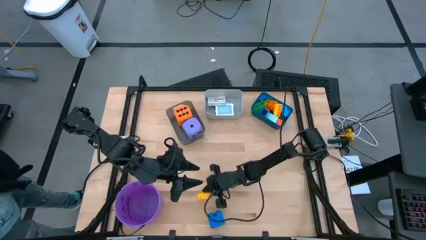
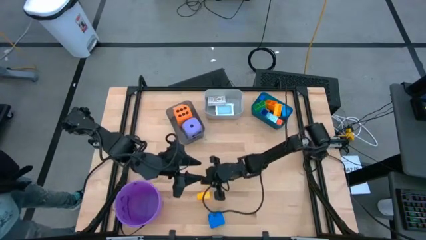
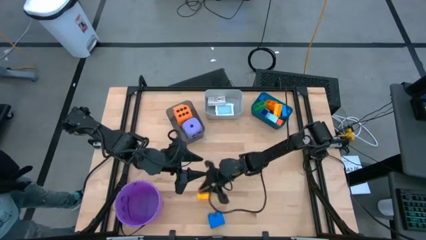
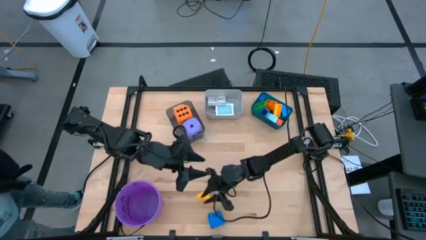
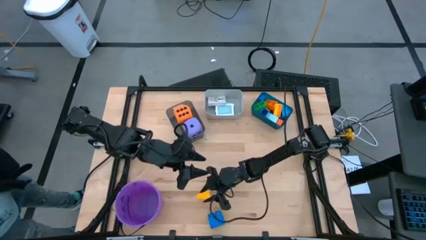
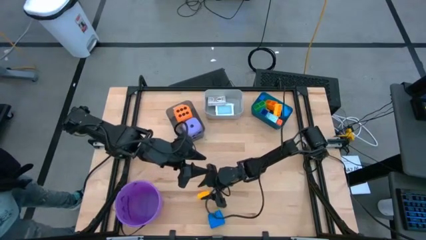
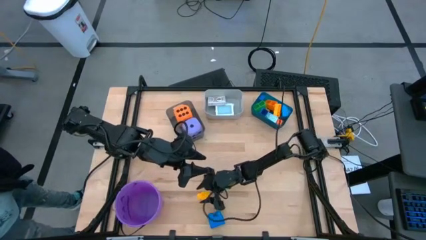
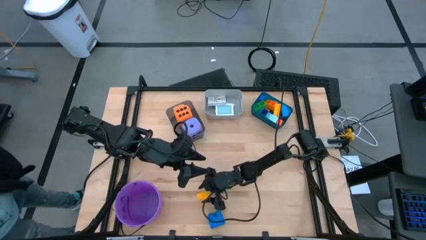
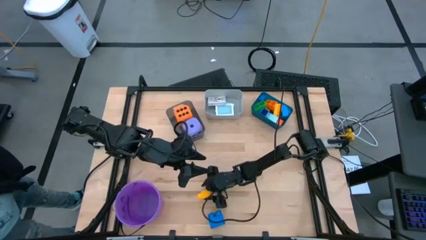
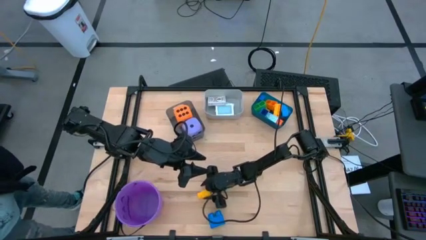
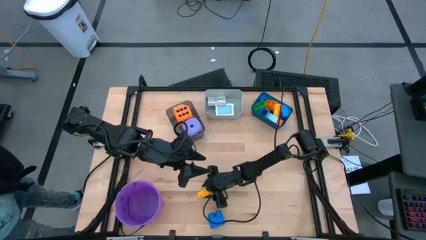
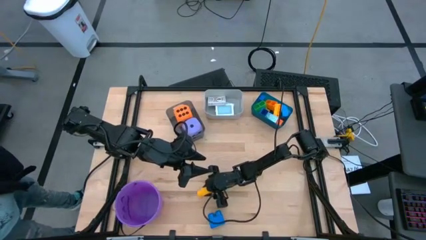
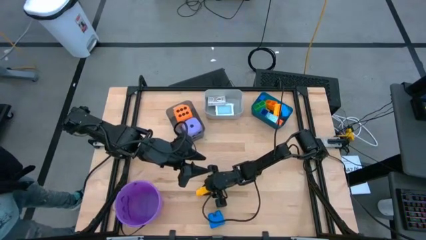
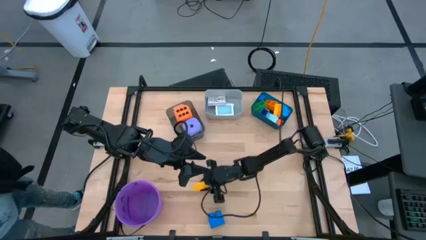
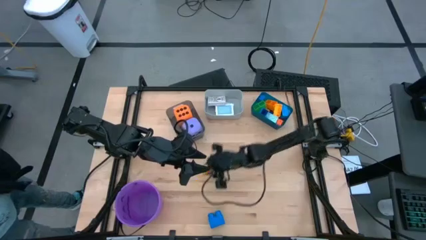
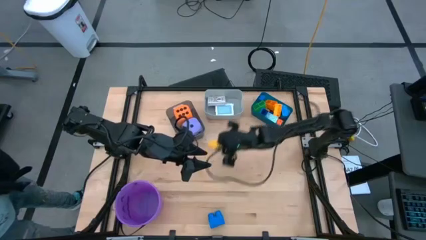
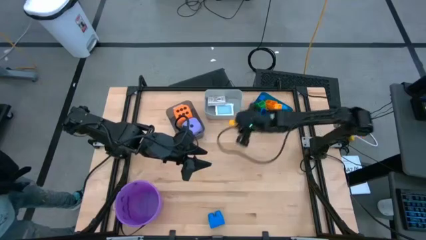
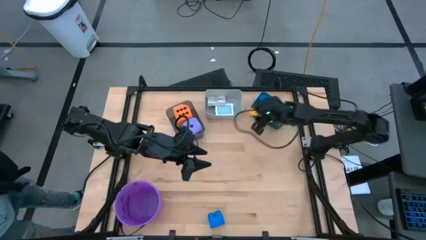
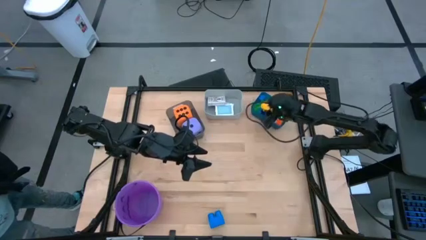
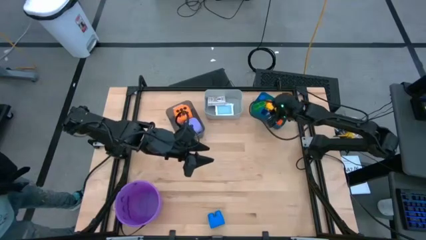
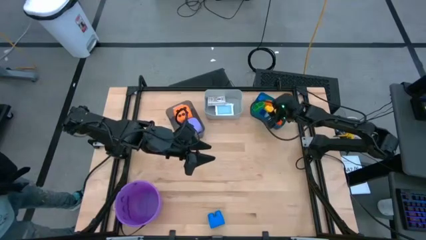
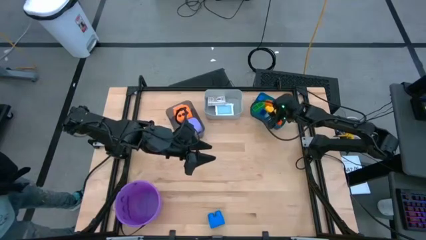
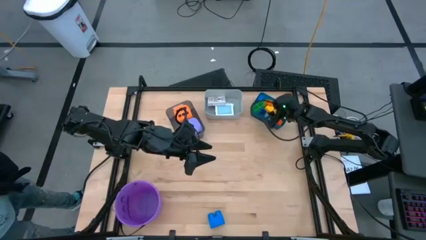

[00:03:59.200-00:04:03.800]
Task: Pick & Place Toys
Put the yellow game piece into the blue bin

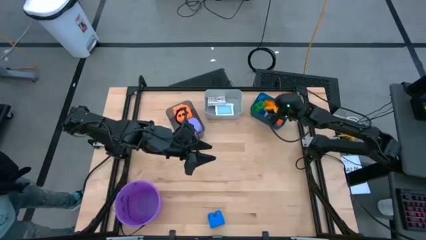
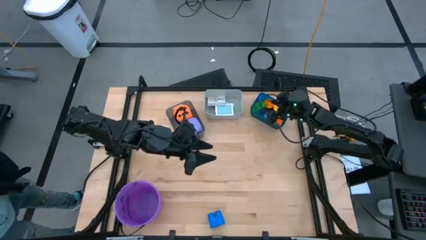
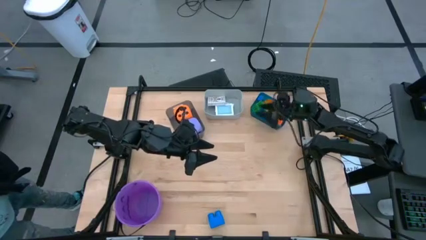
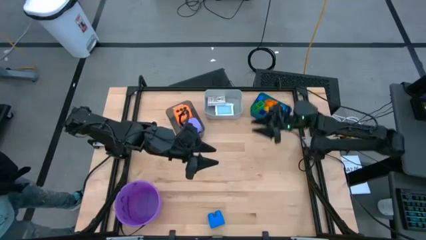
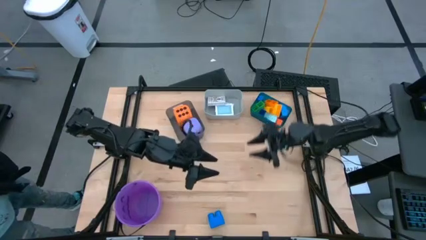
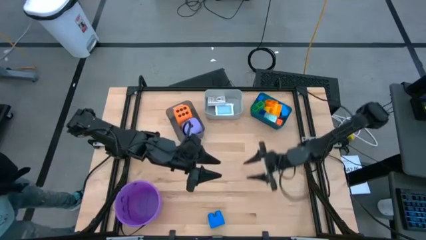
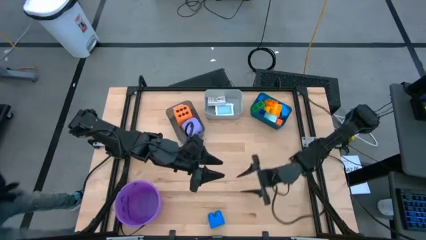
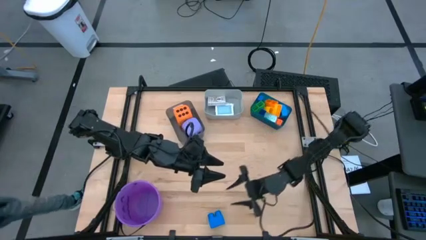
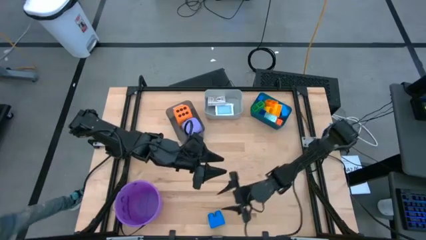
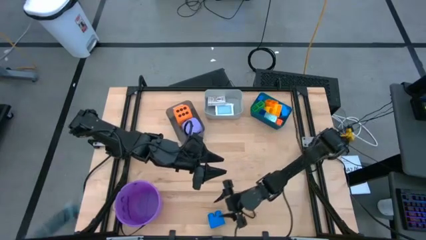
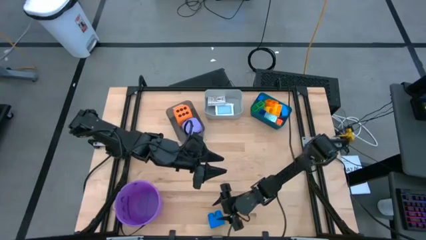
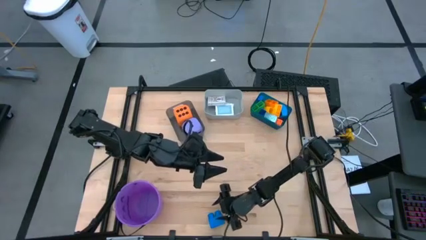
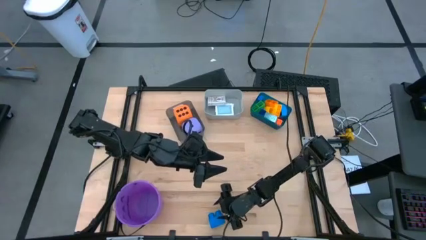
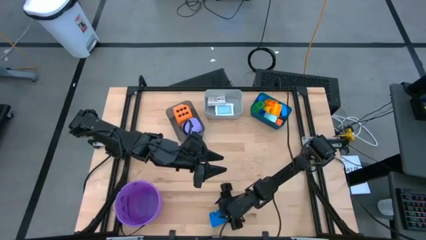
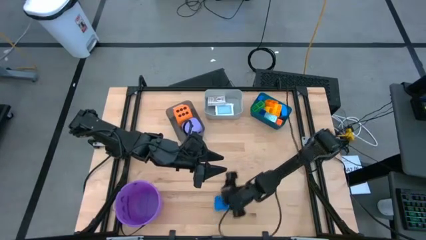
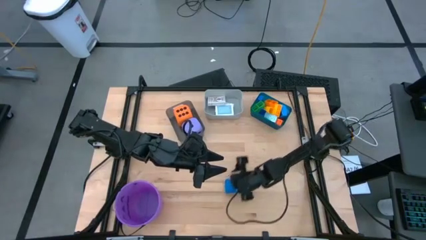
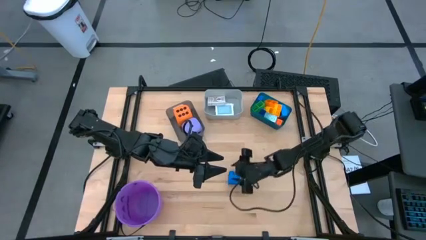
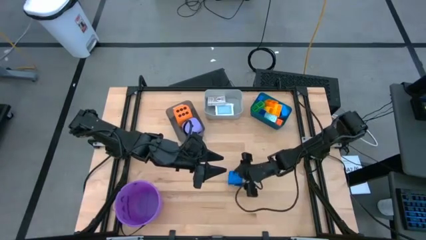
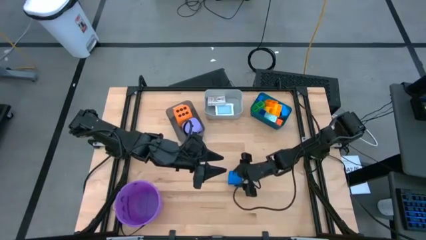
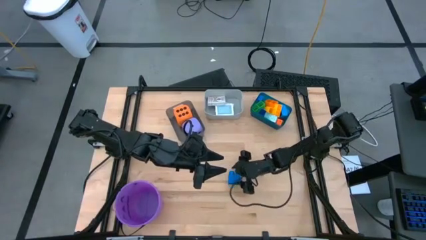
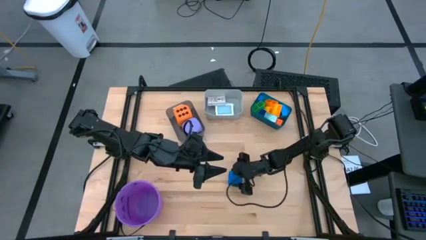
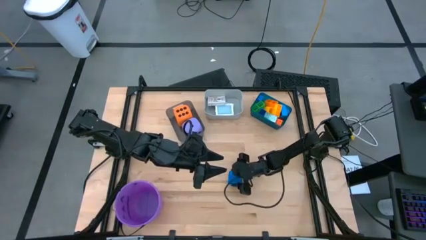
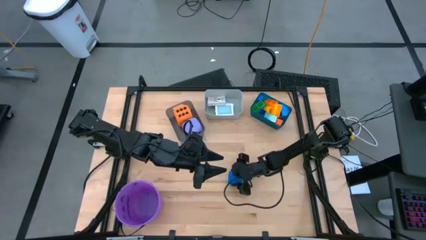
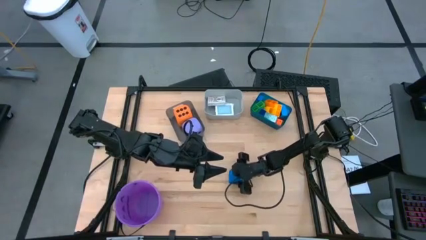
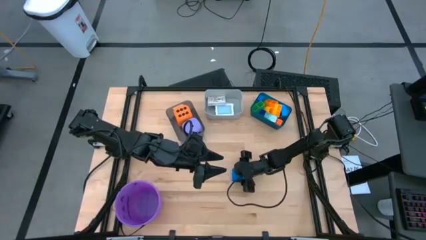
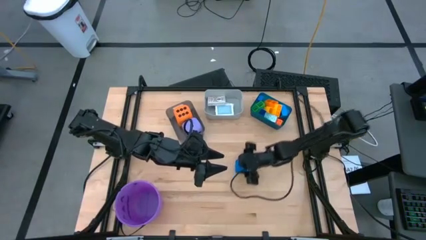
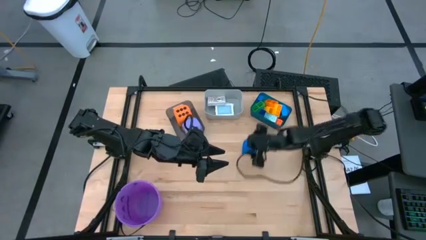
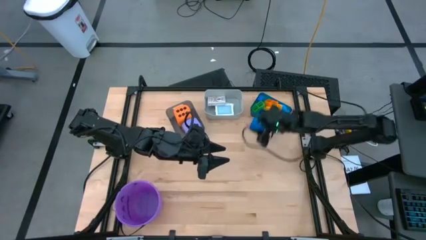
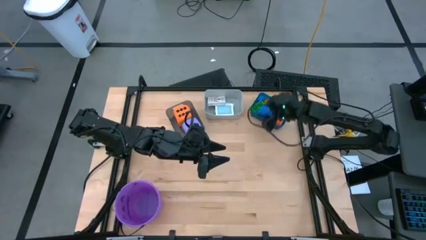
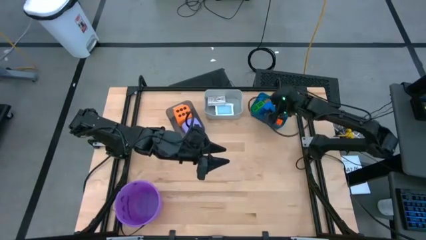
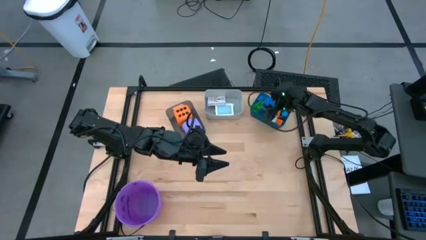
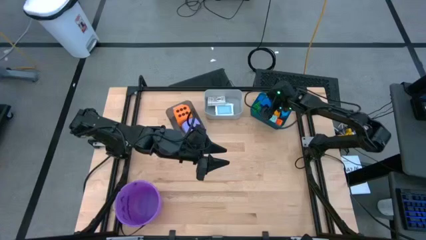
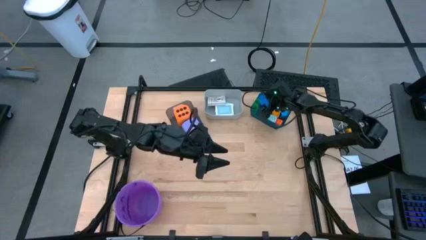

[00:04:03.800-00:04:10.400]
Put the blue game piece into the blue bin

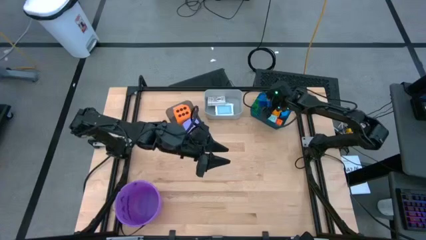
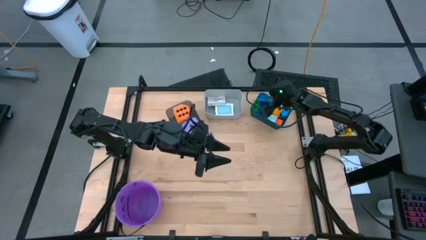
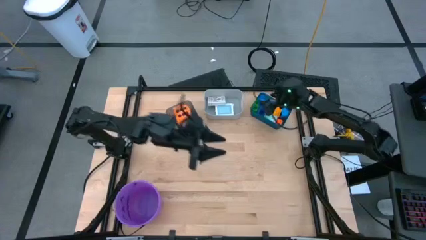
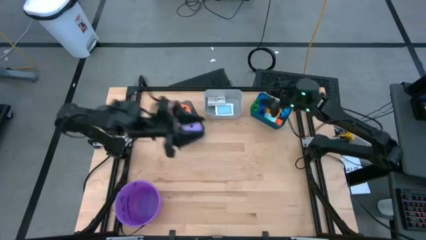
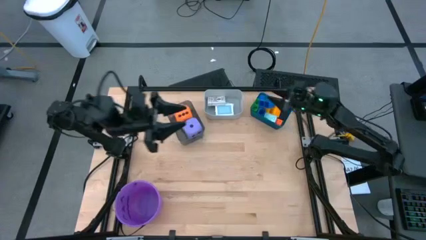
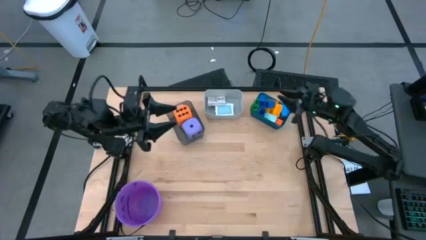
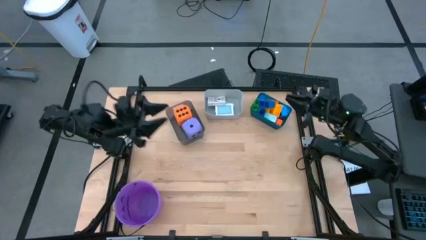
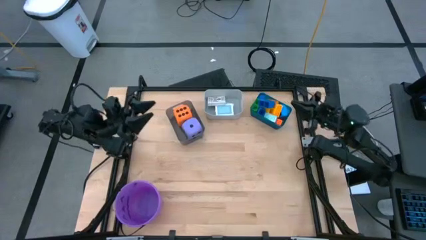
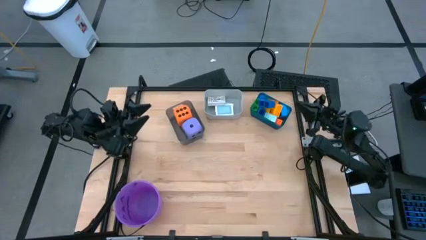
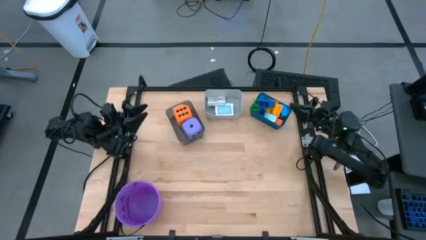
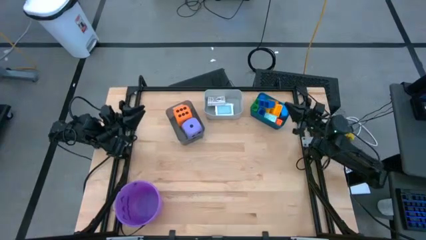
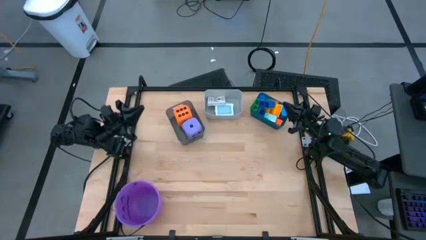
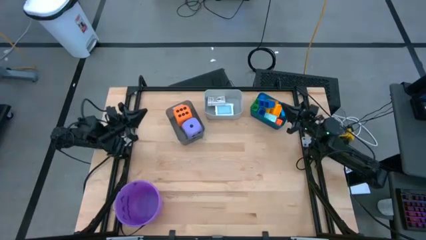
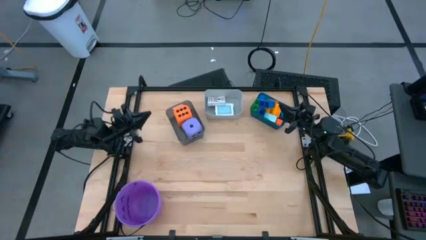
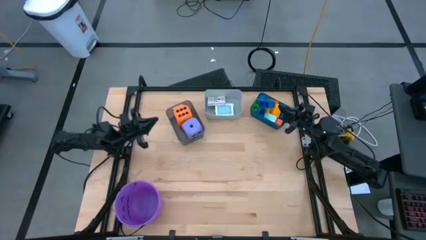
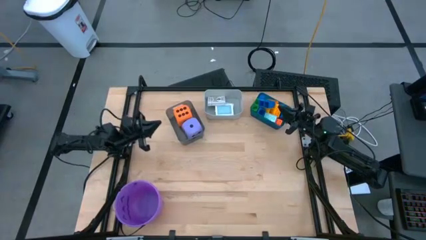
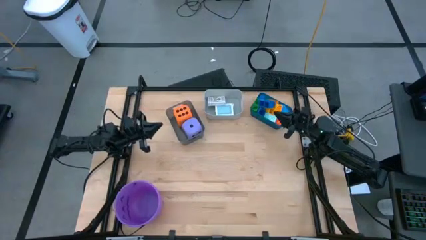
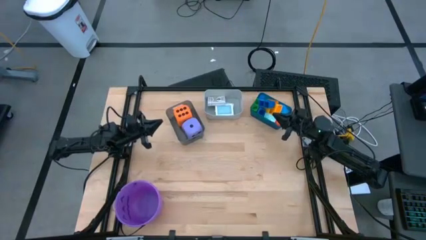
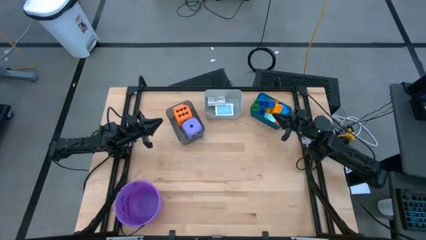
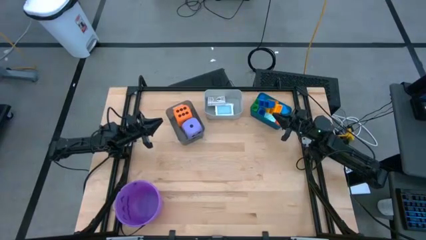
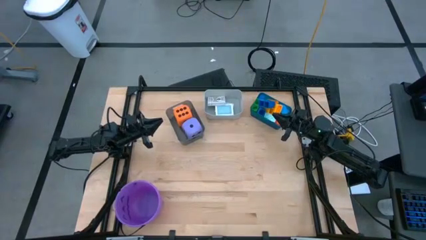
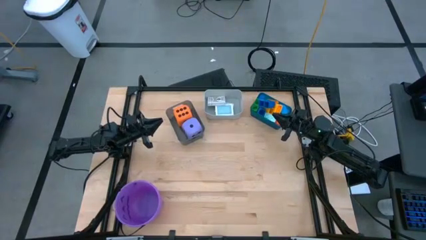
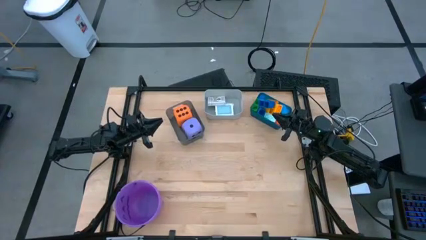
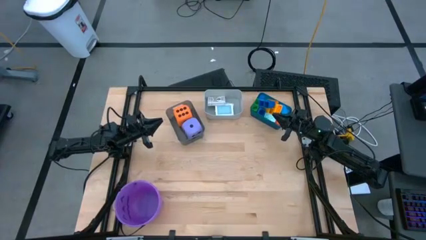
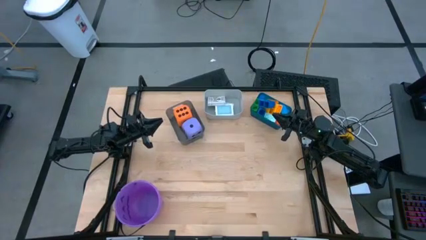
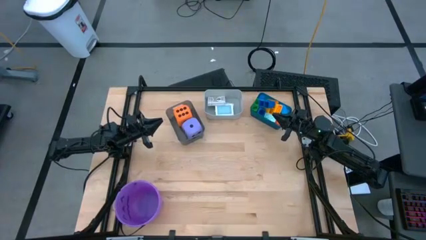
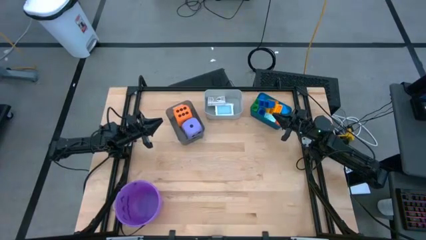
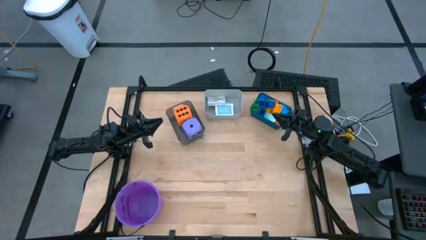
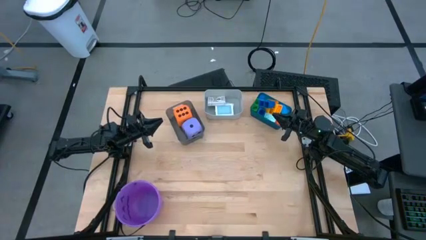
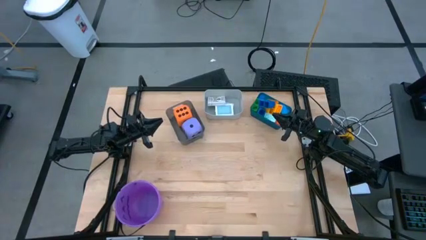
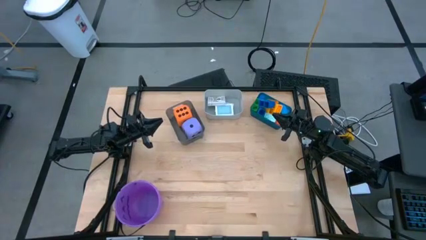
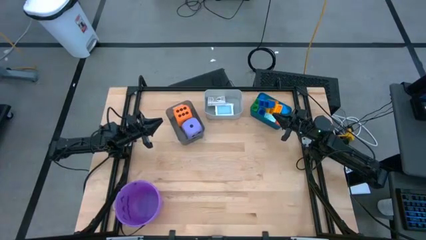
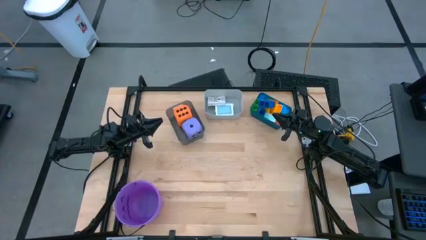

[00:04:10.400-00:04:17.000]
Return to Home Position
